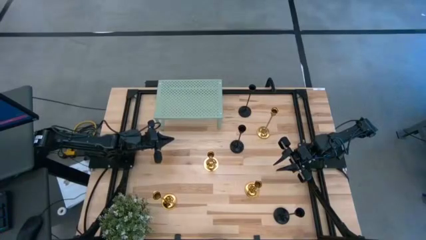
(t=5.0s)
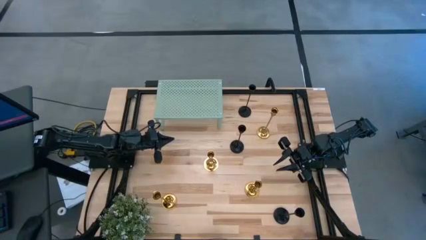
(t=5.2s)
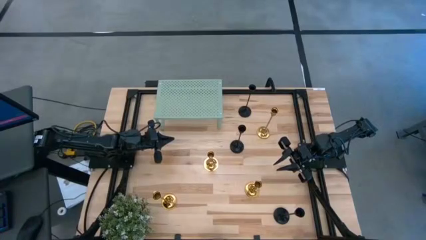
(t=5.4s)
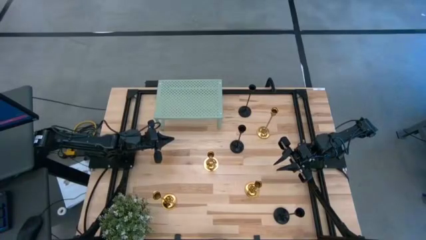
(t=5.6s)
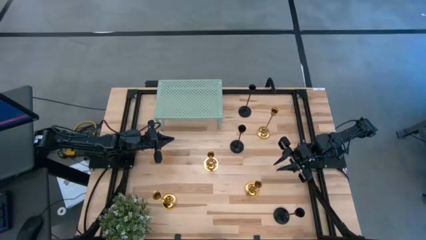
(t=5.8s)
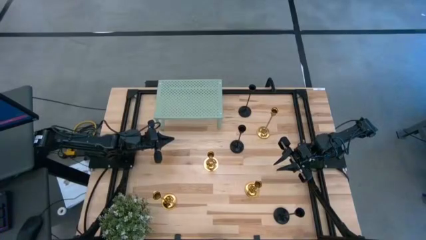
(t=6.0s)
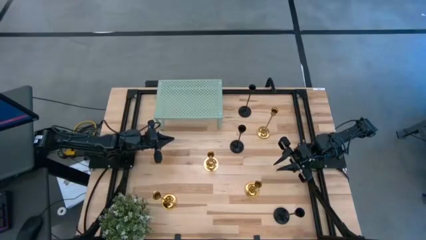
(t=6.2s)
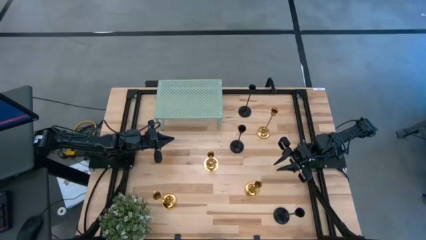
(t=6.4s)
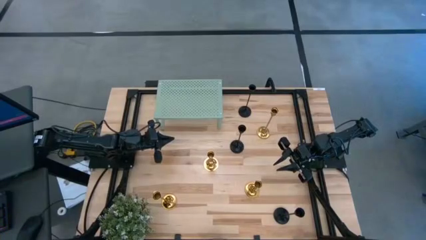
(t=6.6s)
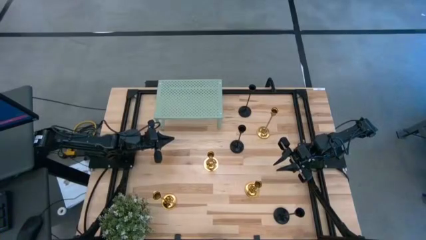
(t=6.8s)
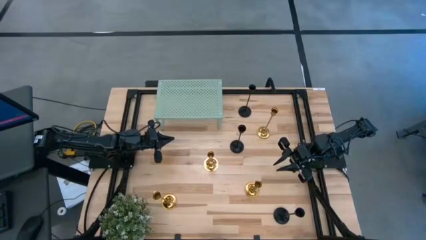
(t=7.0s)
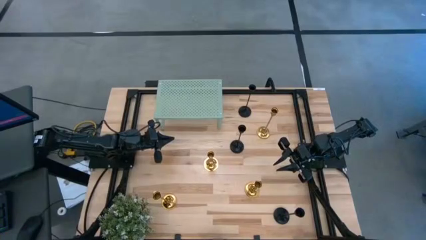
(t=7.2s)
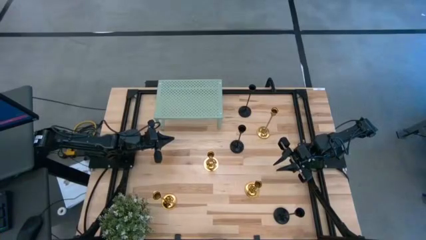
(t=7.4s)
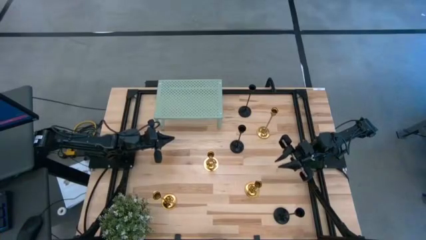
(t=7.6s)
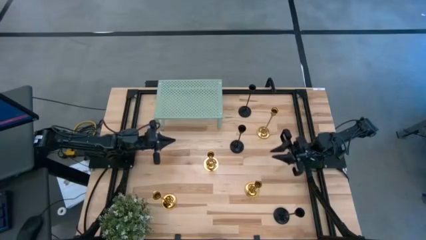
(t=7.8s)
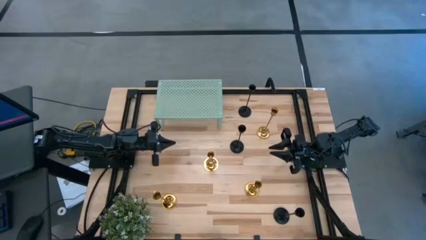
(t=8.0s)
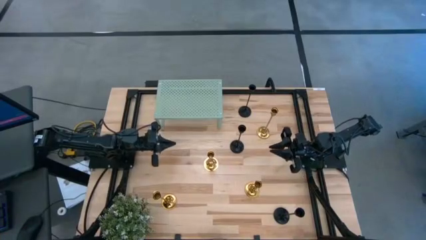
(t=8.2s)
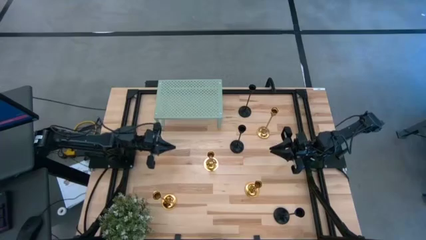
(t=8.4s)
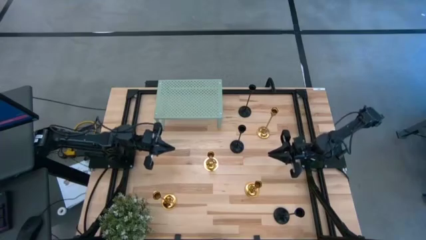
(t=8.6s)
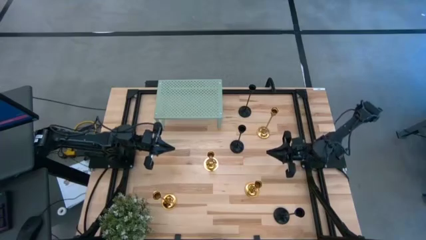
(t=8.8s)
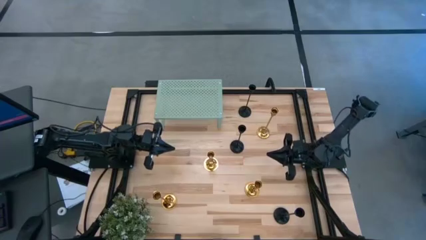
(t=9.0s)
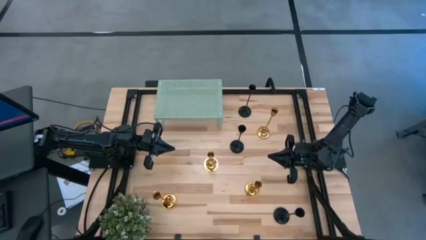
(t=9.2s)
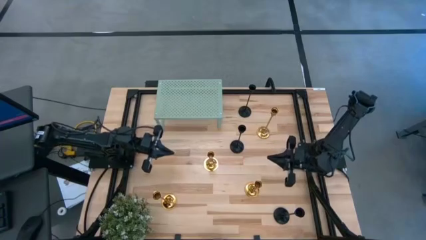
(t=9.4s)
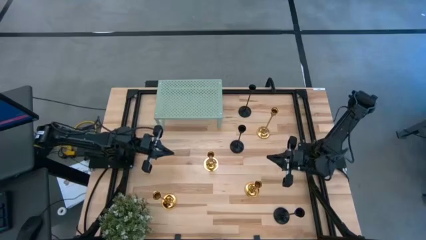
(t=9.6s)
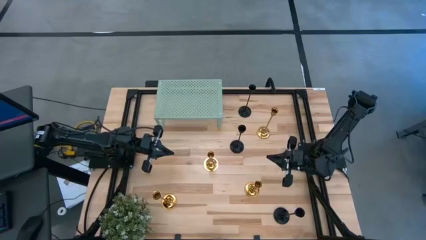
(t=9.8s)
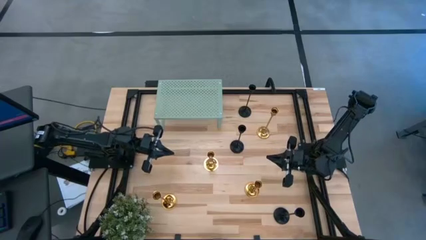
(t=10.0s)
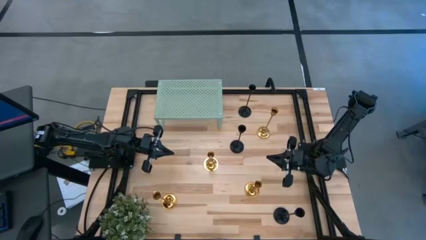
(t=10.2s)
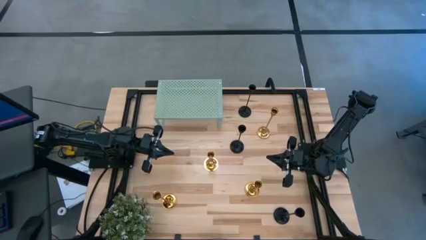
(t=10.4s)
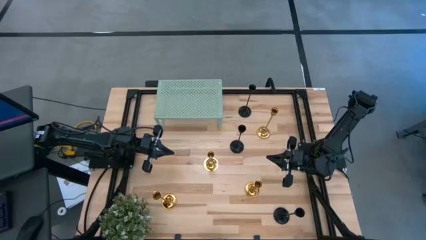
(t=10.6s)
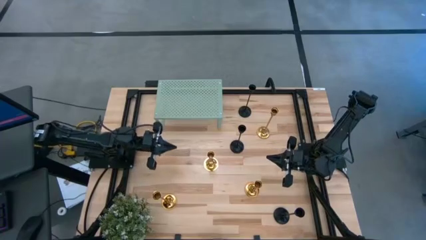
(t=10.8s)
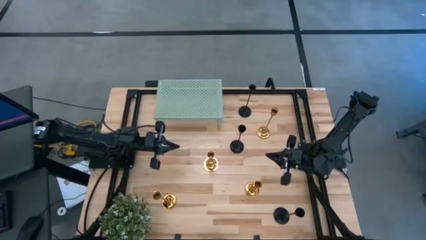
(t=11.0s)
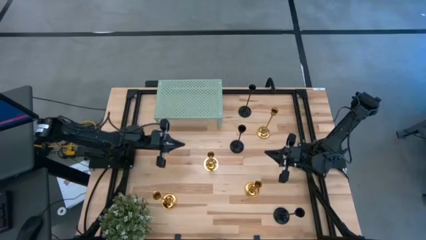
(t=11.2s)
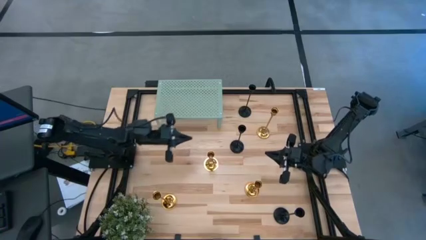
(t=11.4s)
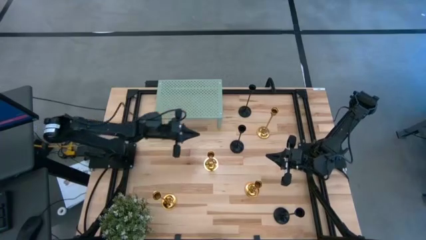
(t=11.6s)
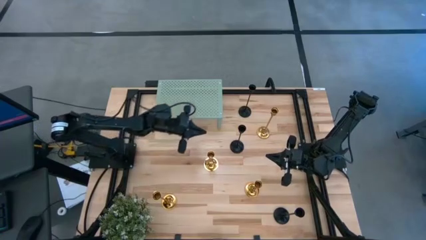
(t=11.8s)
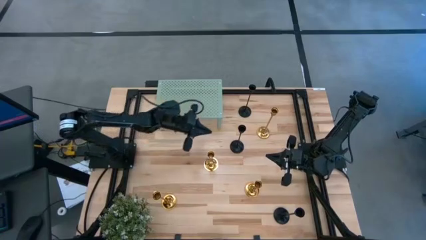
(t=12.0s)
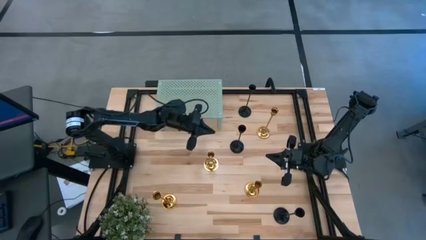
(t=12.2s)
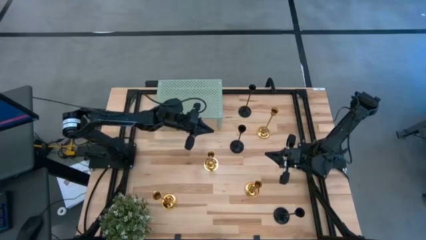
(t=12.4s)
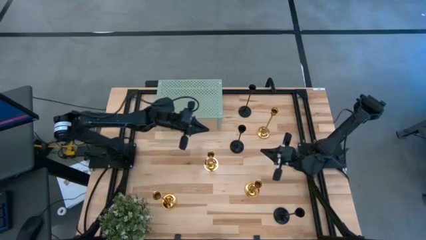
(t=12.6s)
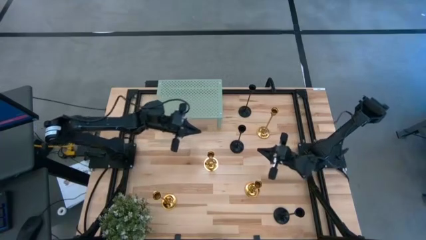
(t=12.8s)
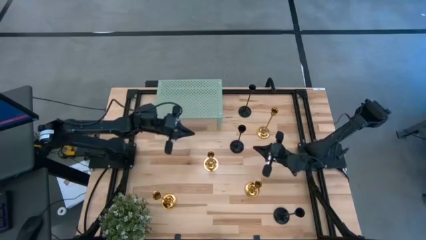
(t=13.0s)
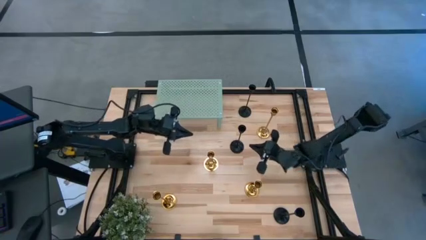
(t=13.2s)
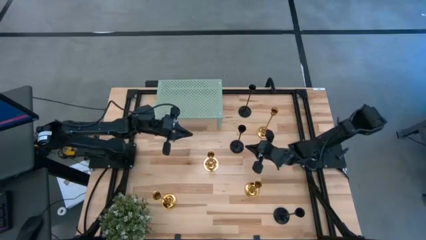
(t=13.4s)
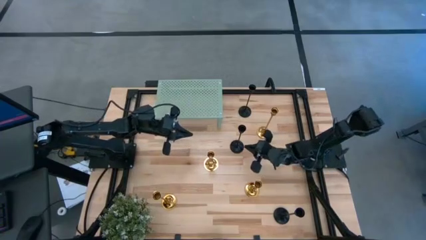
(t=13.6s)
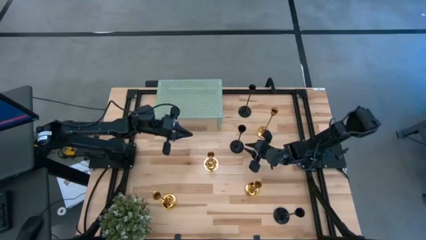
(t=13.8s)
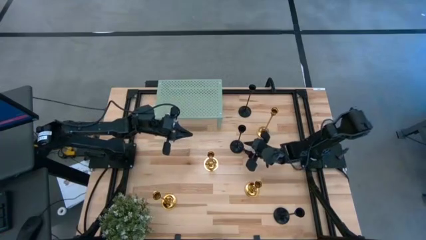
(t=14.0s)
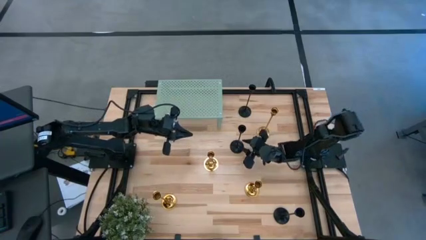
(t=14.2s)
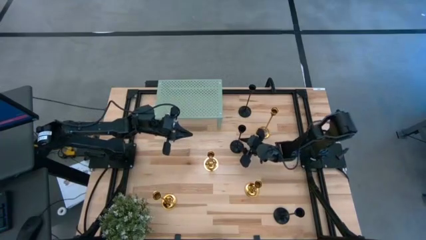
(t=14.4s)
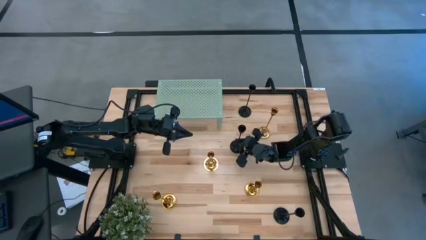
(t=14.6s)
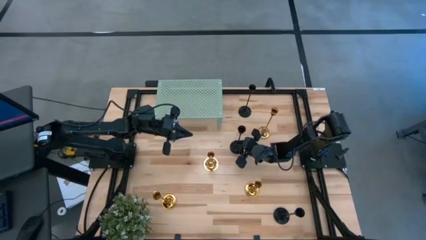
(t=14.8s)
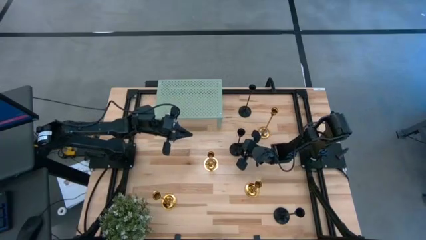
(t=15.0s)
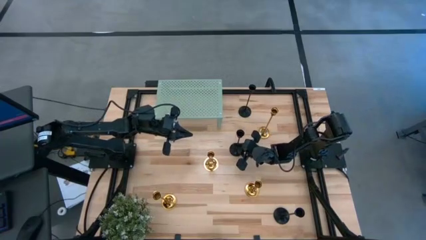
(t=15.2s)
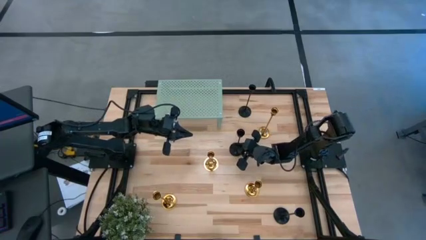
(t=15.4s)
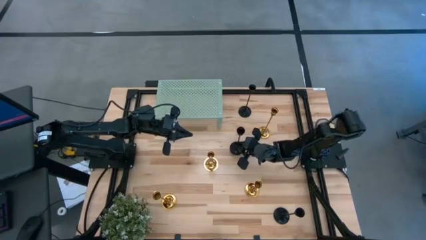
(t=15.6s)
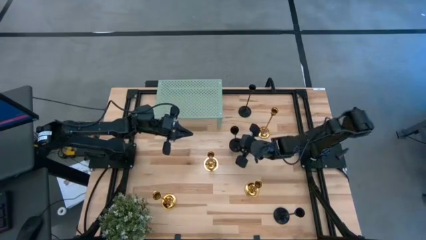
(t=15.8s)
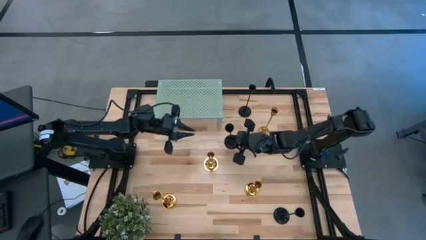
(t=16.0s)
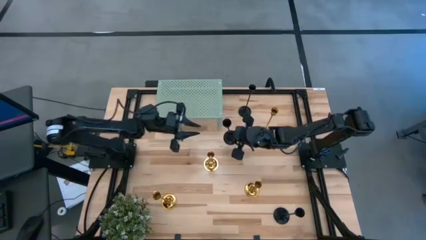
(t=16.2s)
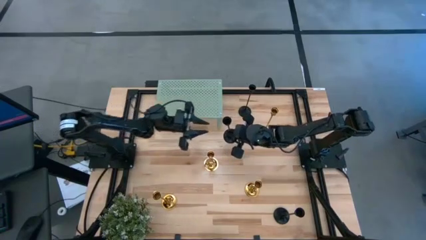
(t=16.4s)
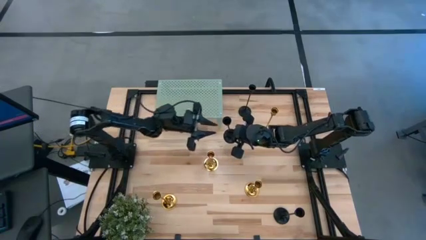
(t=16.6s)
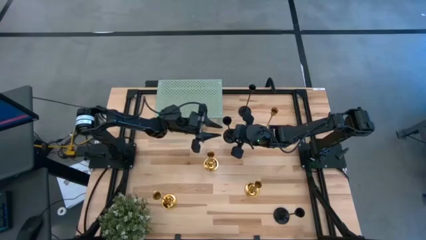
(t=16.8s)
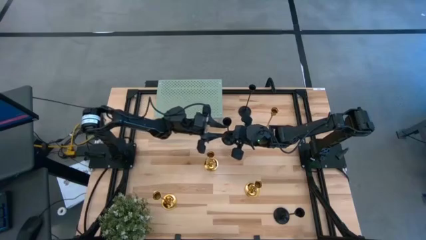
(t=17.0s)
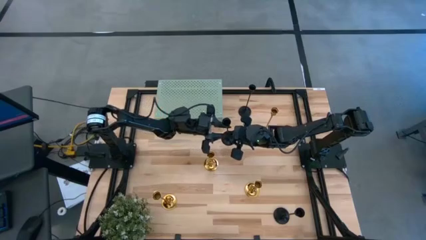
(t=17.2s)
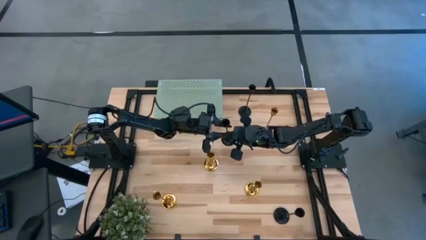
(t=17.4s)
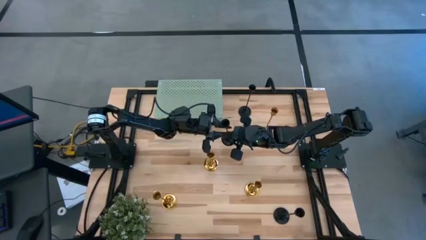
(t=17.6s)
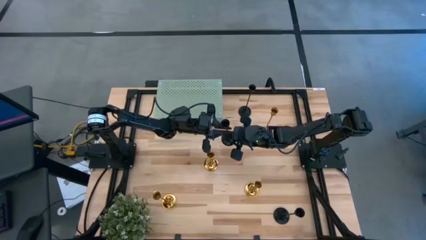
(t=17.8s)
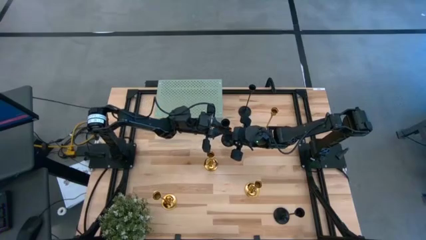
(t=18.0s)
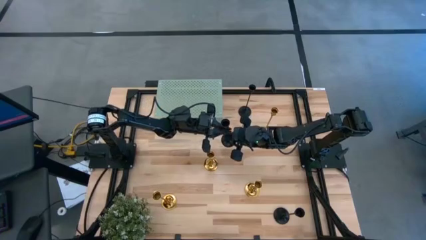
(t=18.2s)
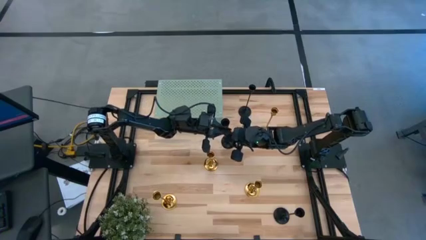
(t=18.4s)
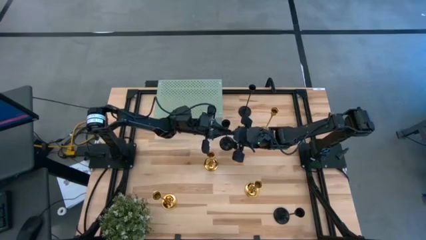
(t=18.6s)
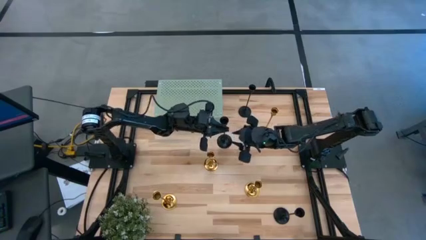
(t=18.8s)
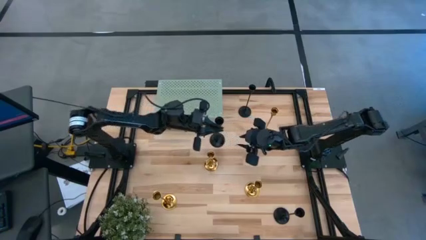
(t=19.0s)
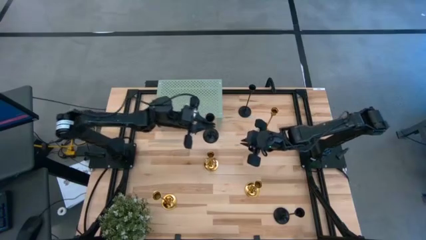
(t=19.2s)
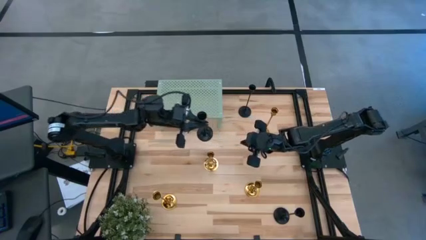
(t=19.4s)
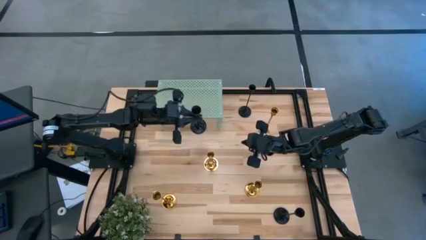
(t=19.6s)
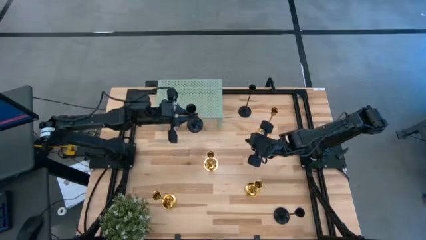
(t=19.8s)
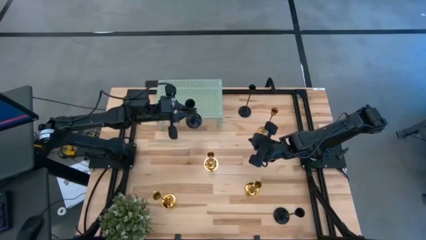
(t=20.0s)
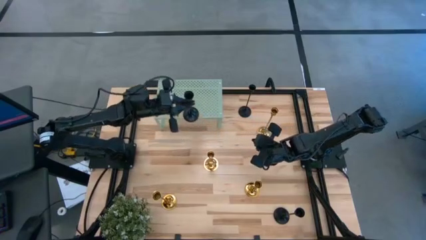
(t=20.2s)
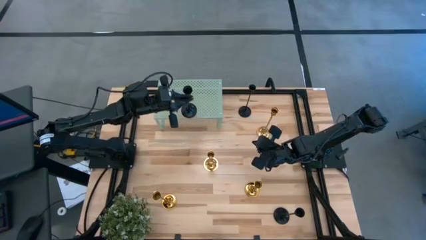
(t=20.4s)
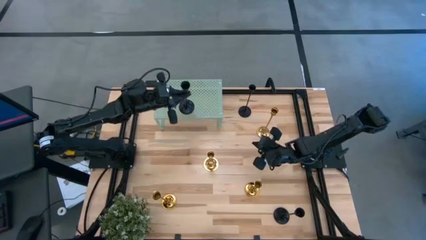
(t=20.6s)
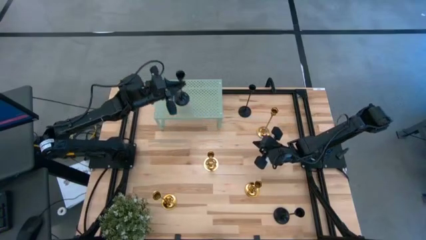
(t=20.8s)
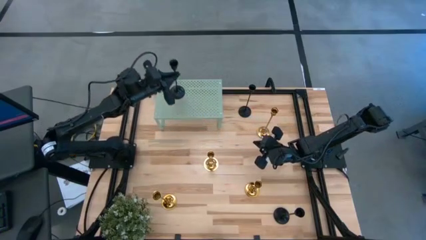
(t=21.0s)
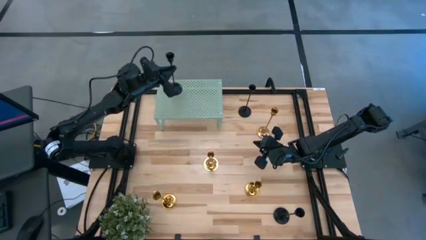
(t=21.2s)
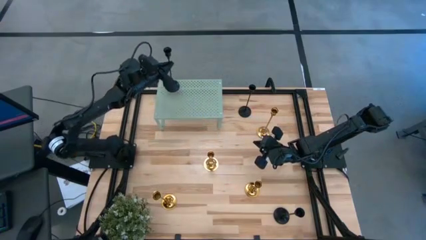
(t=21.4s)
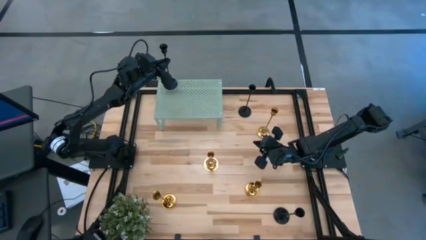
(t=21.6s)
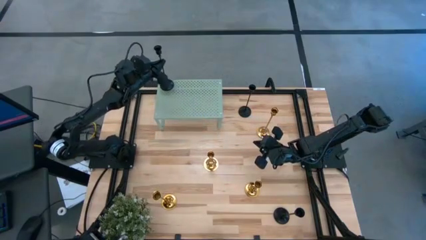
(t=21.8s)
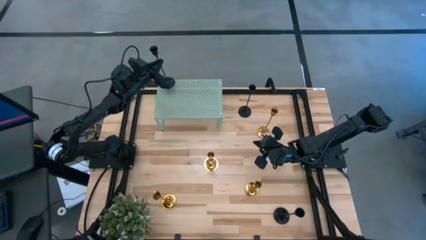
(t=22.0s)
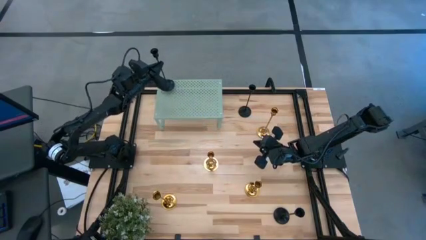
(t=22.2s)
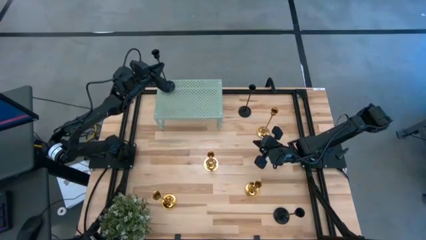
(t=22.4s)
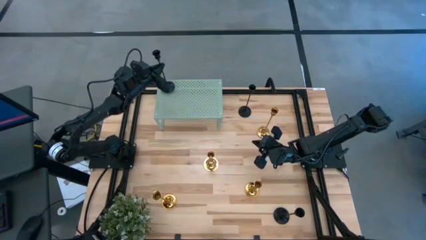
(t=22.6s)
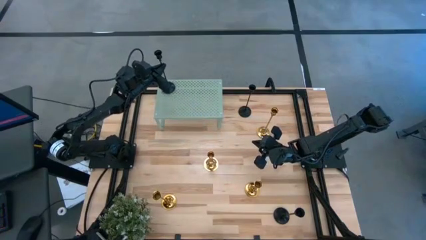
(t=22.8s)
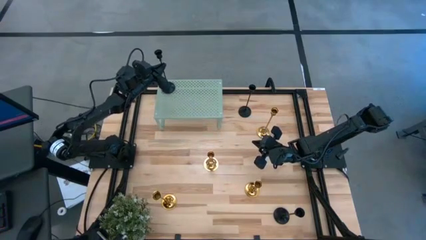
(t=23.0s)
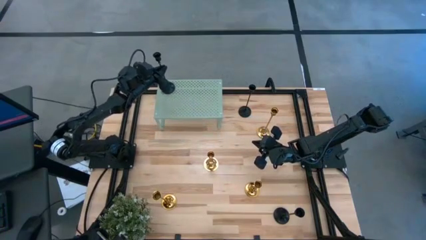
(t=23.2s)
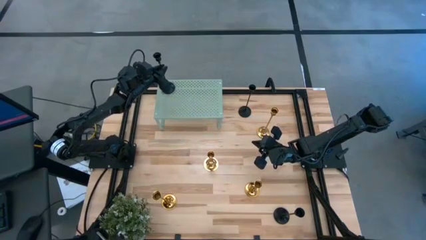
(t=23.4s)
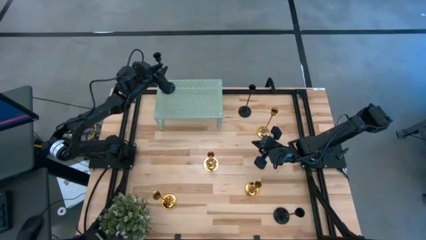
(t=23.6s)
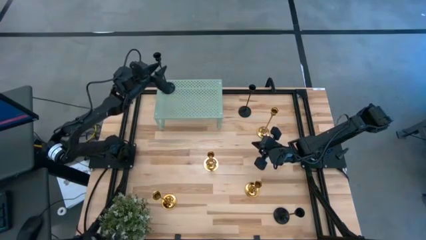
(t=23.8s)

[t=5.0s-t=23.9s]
Task: Pick & Place candle stick holders
Put the black candle holder on the shelf
